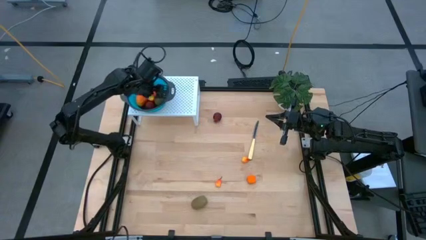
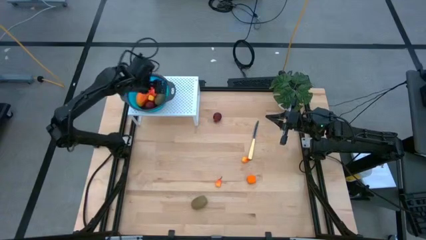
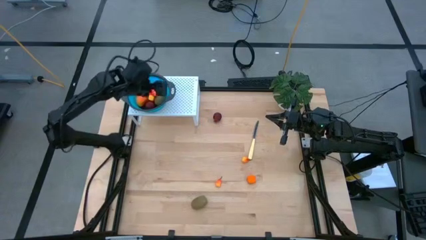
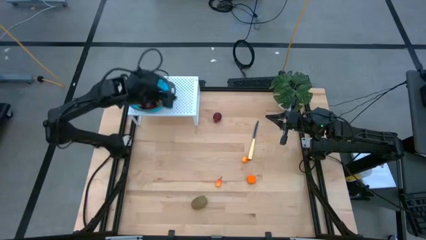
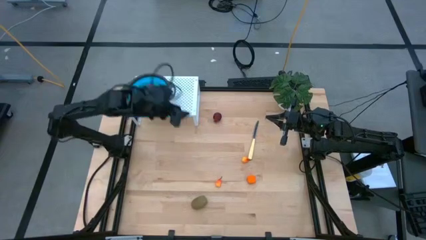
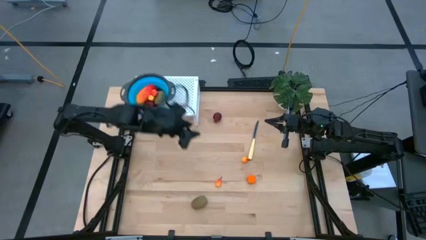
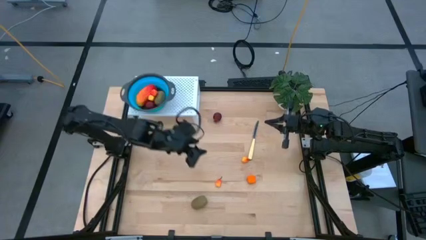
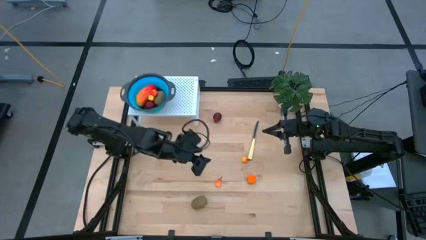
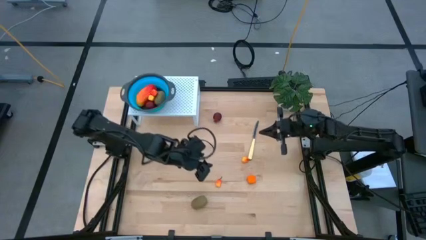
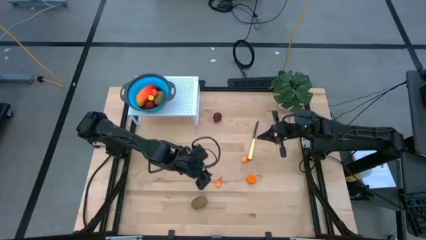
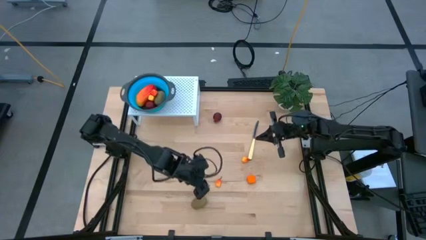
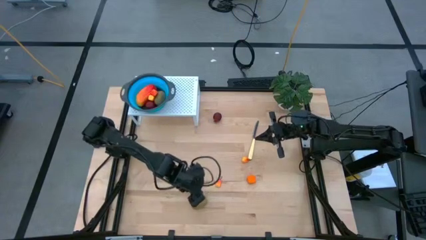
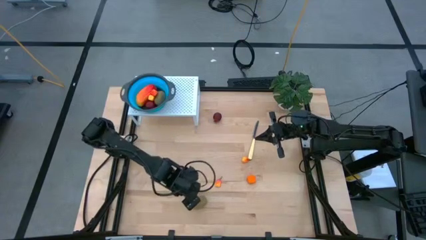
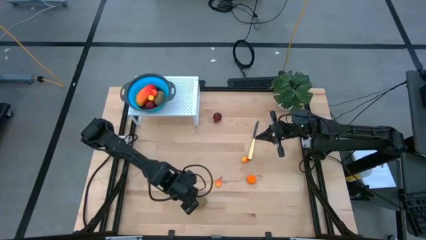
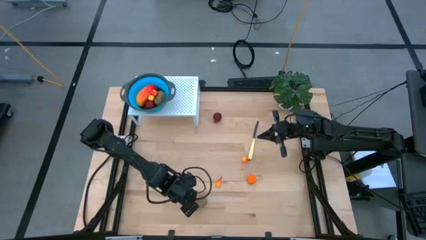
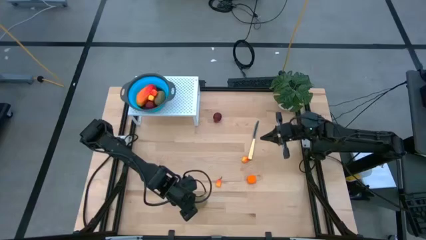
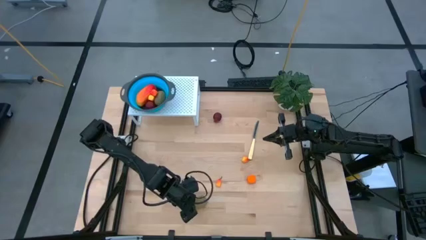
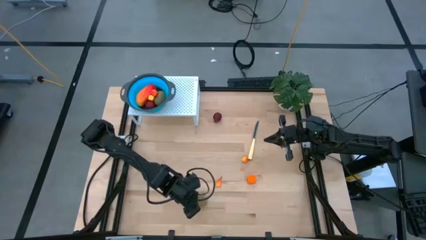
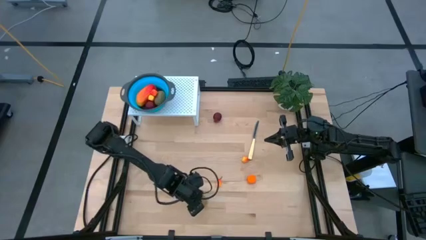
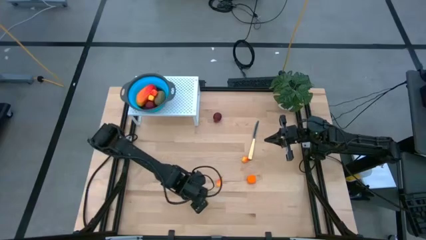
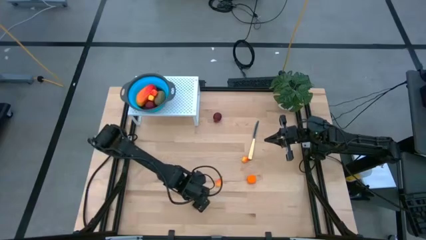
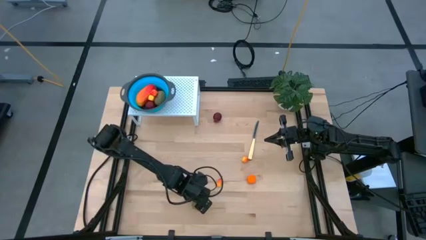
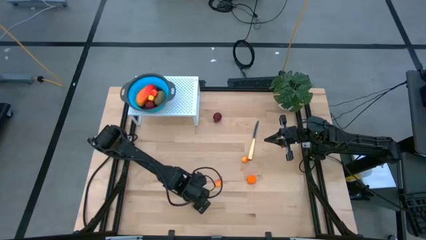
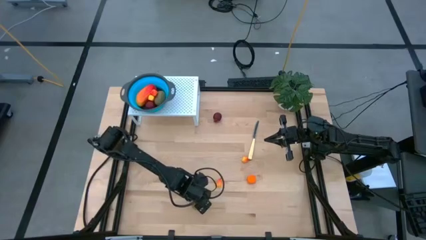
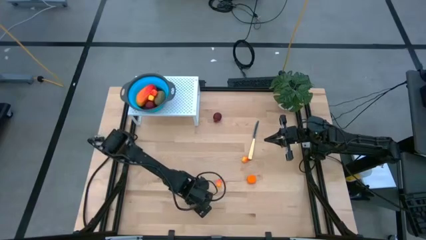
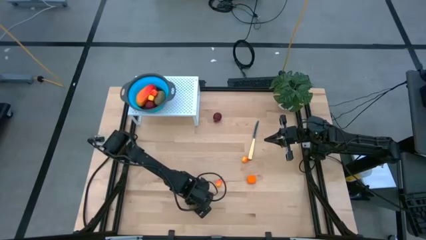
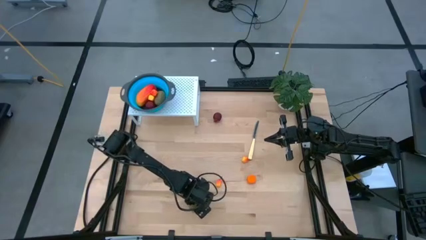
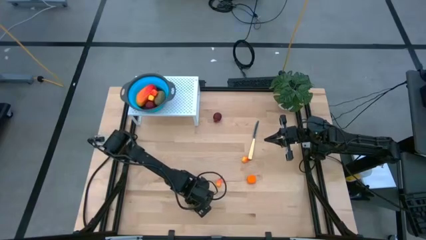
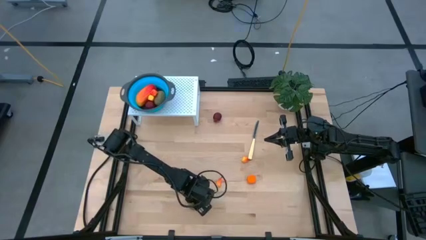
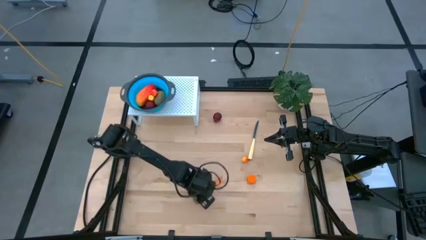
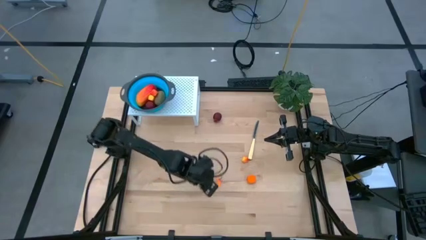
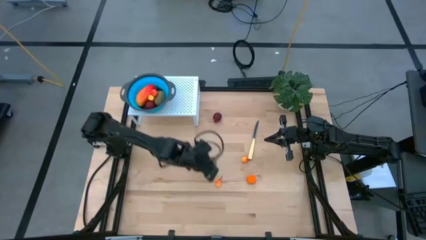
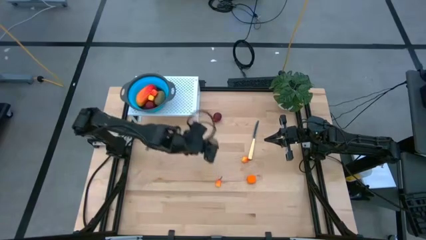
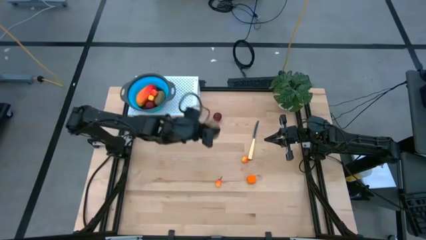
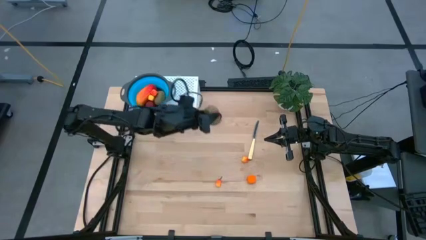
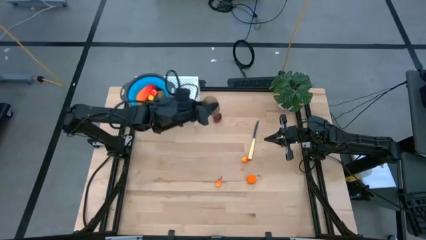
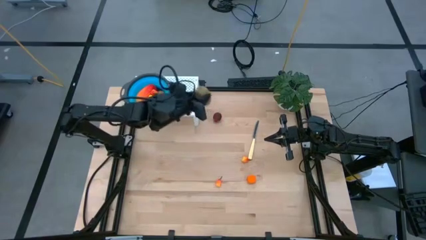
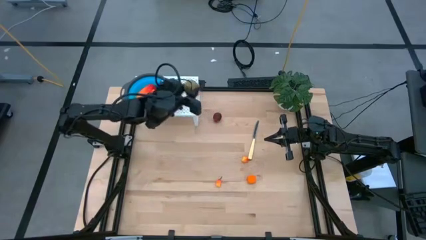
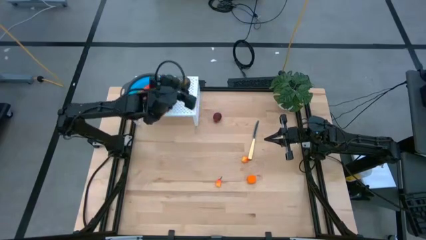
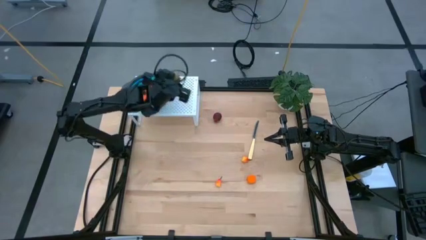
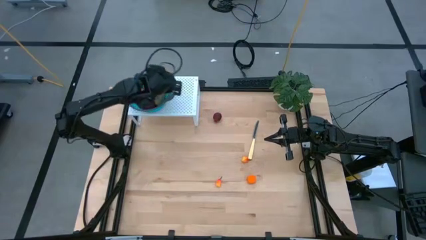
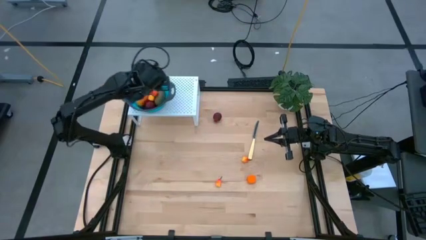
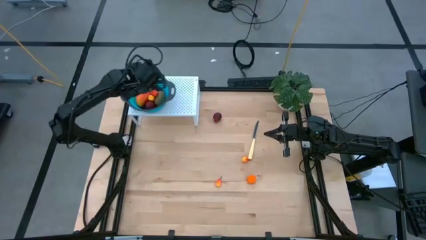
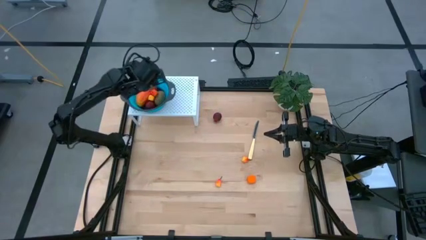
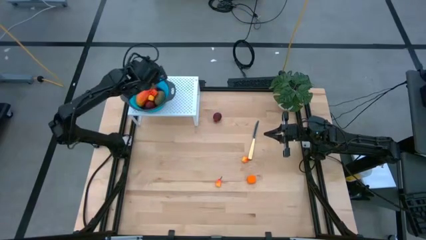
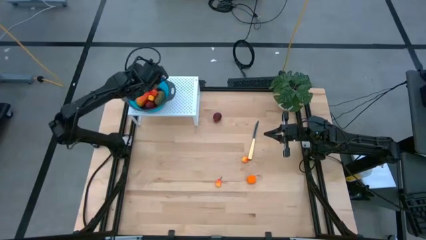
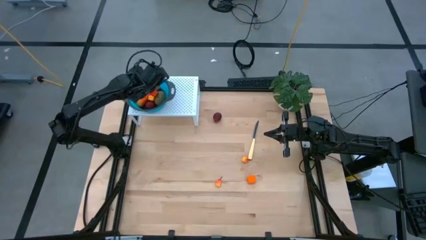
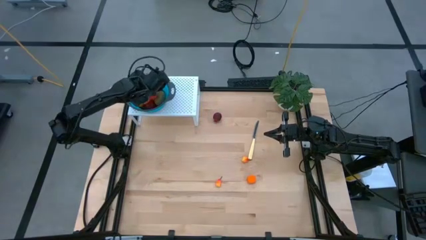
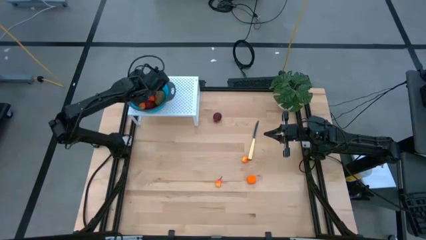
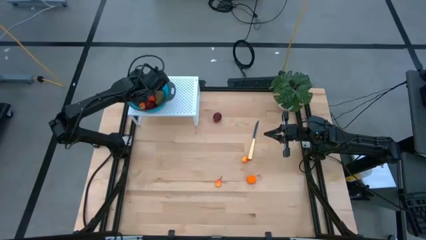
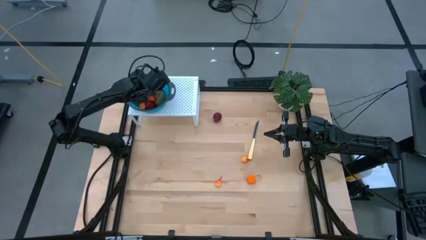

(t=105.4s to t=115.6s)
Task: Pick & Place Fruit
Put the brown kiwi into the blue strainer bowl on the shelf
